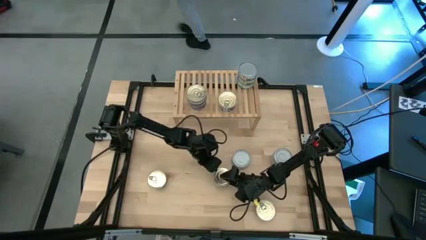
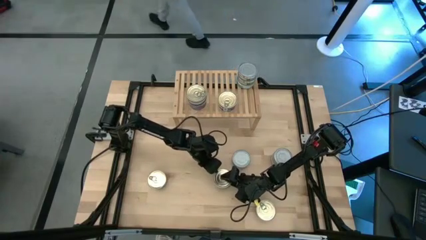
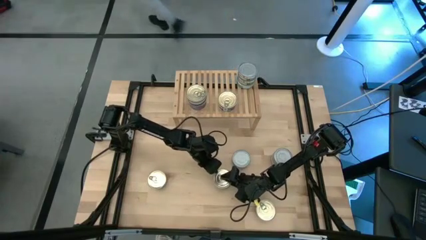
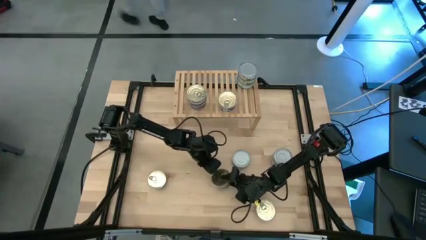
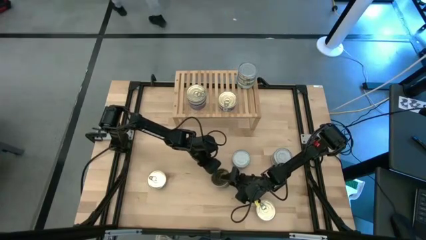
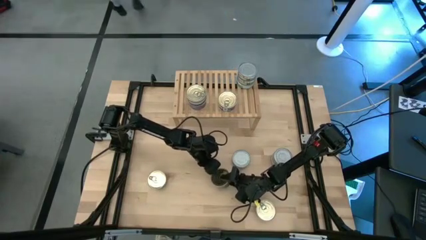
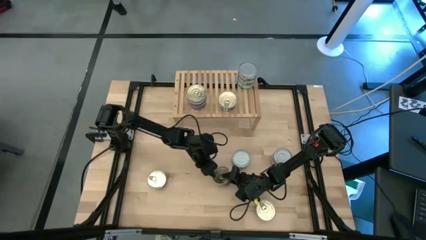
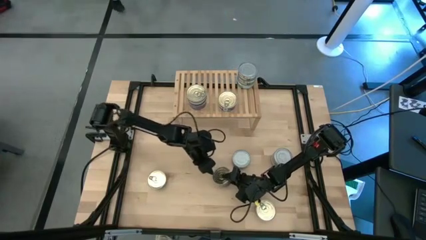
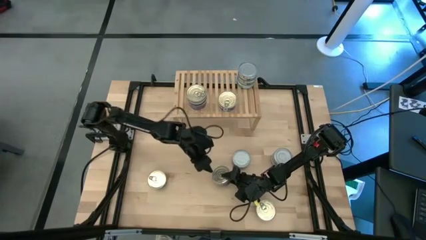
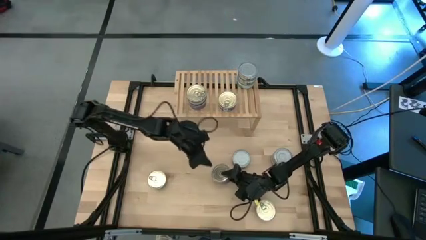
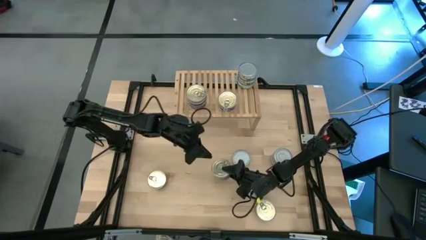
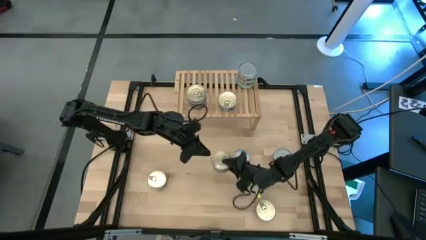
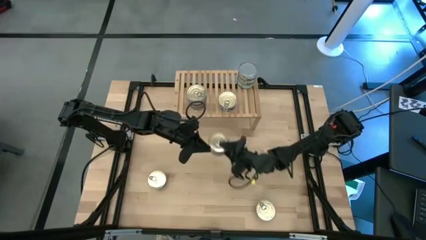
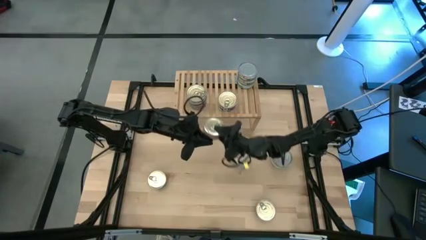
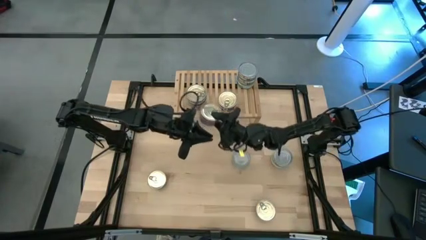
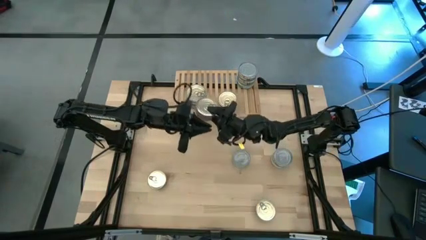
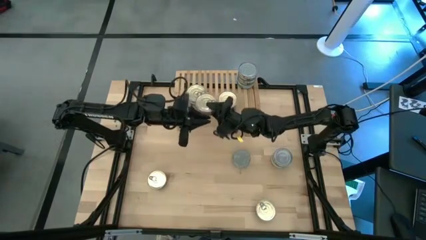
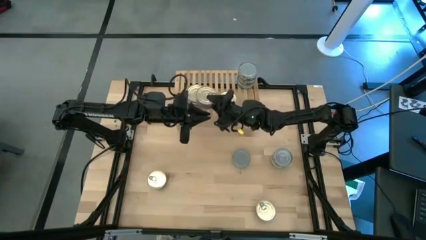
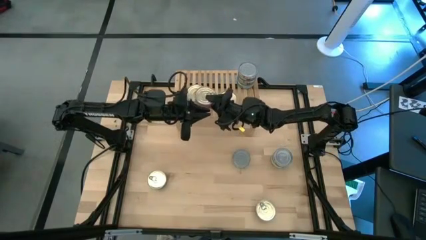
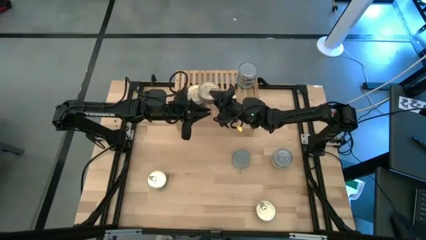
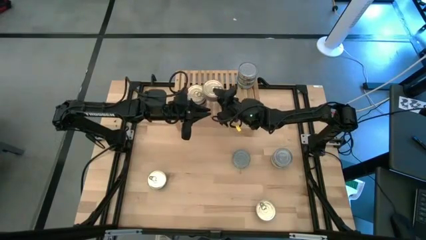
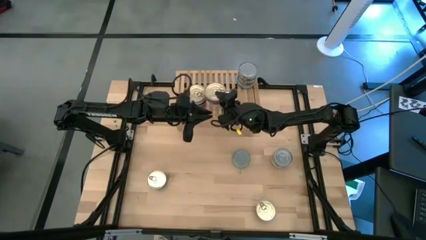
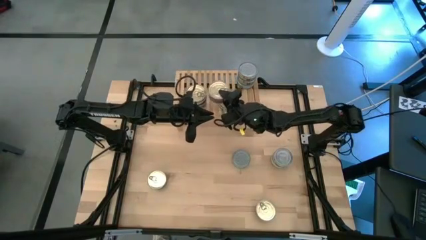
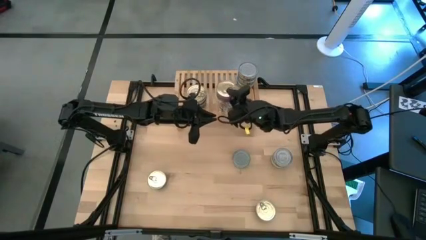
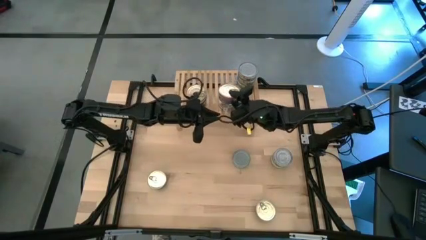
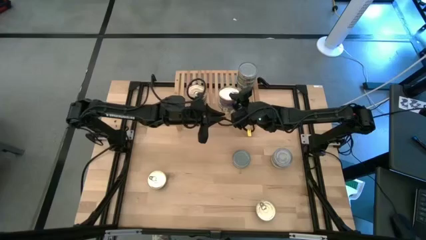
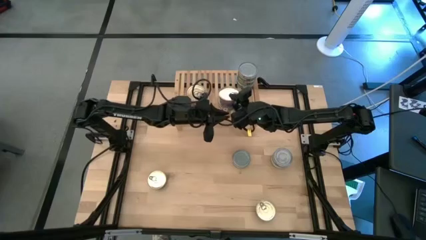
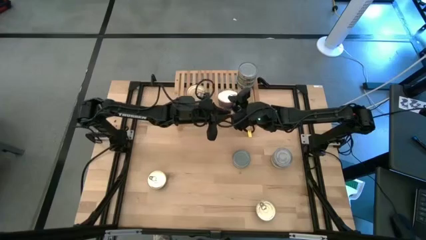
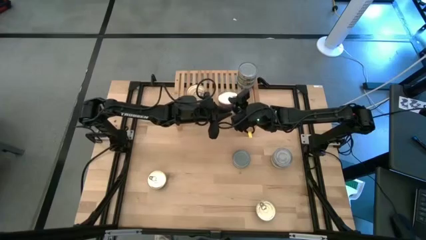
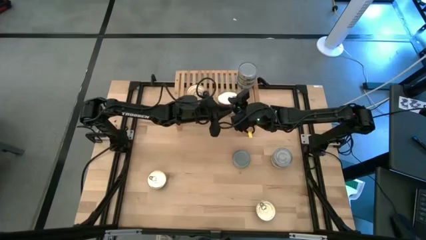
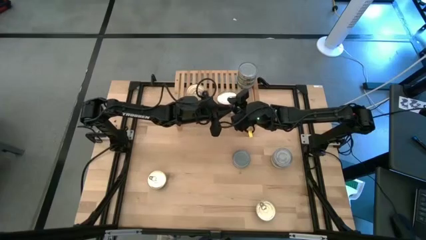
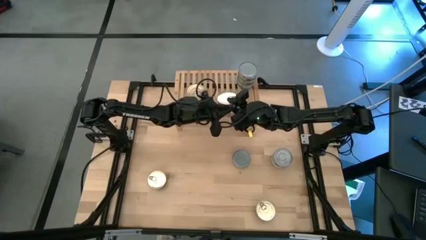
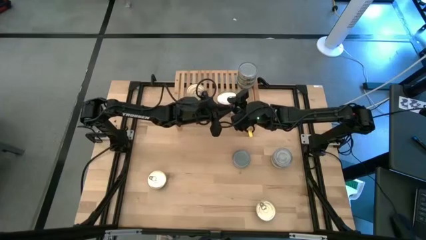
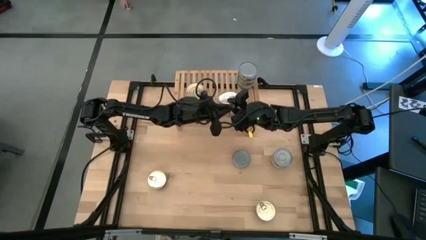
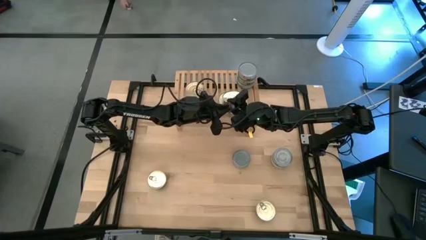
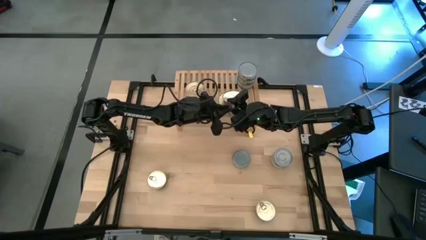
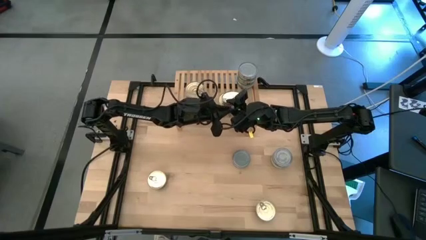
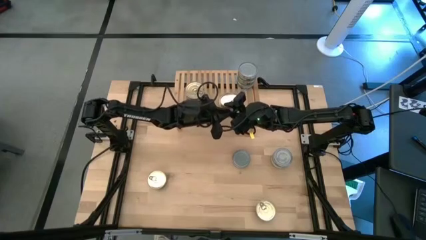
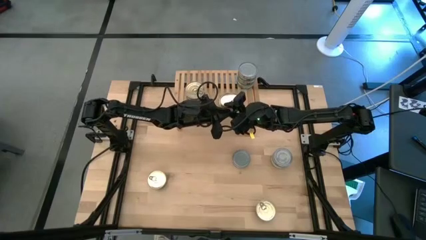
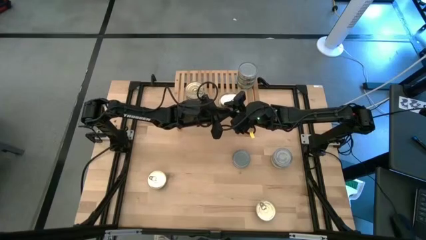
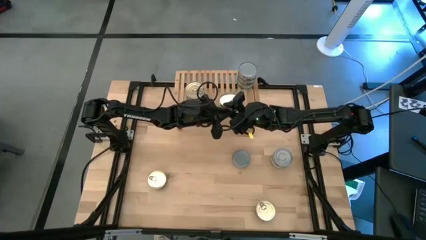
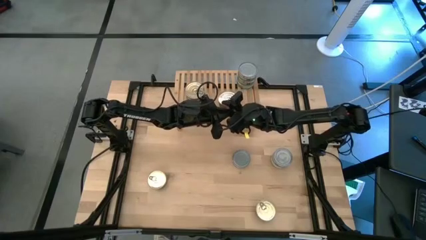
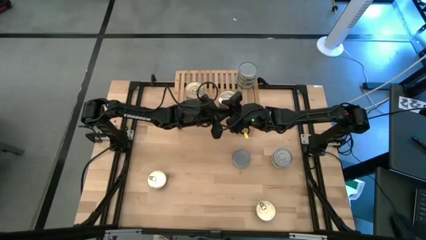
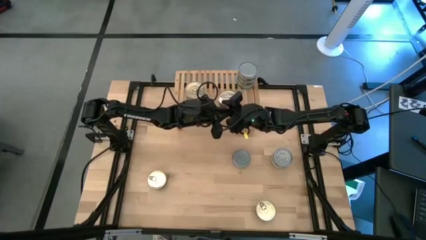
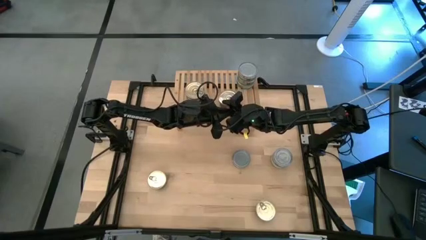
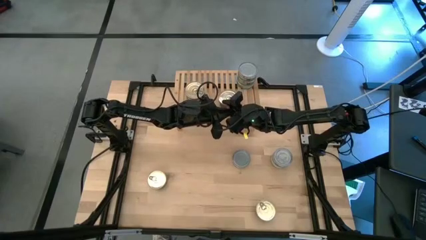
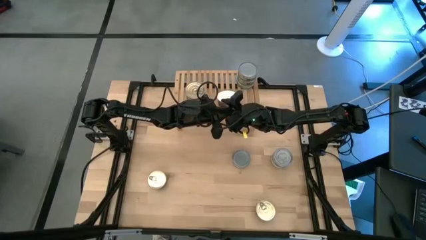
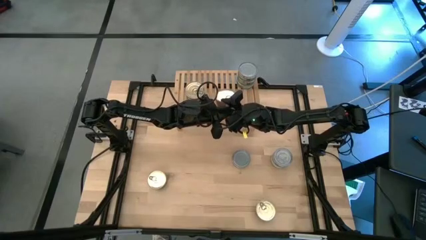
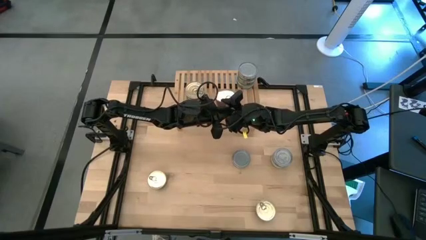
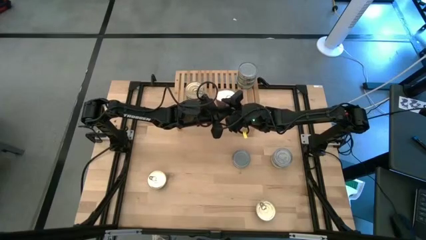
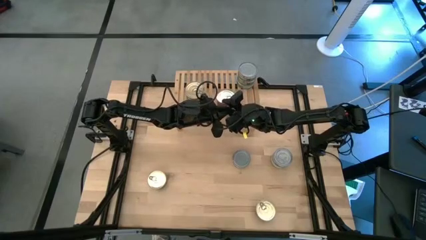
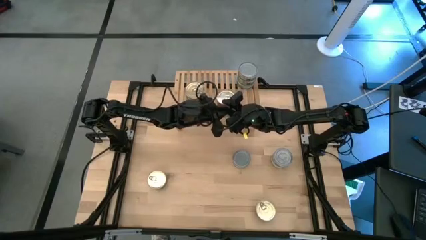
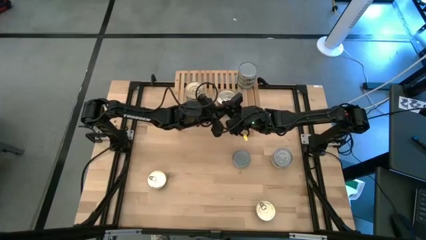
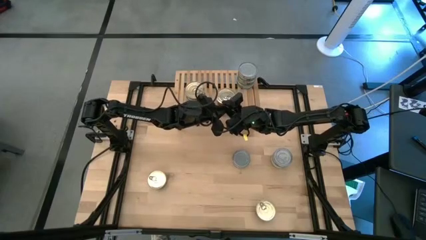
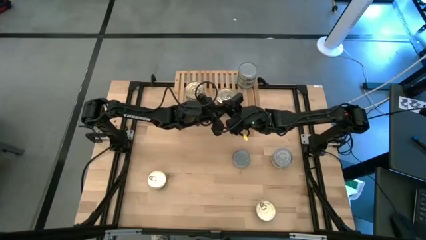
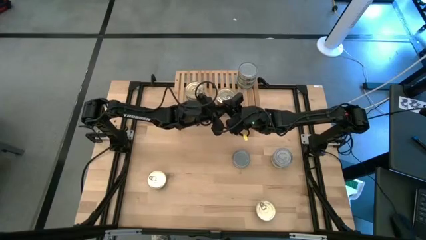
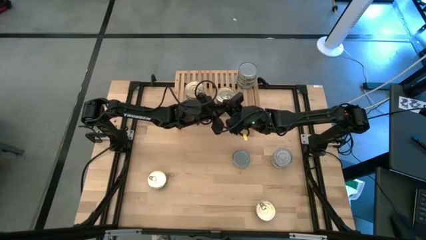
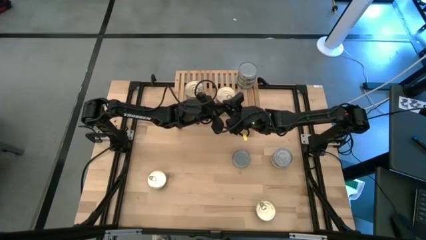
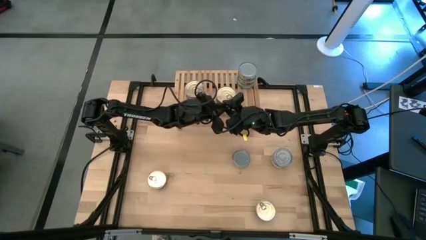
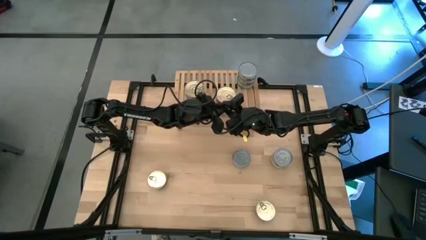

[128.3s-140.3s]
Task: Stack canned seafood by type on shelf
Stack the blue tuna can on top of the blue tuna can on the shelf
